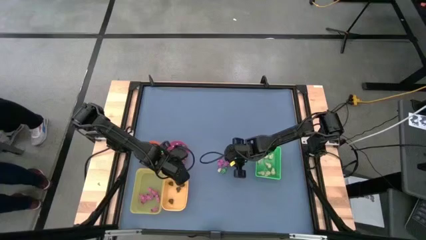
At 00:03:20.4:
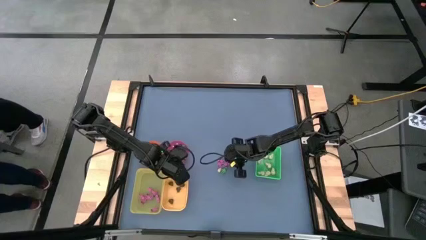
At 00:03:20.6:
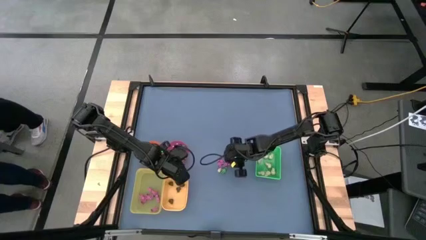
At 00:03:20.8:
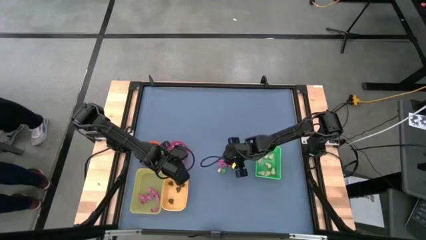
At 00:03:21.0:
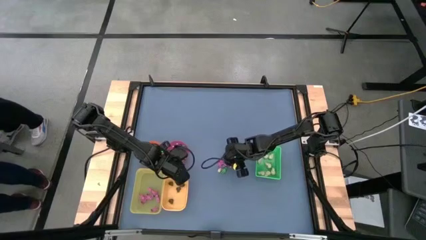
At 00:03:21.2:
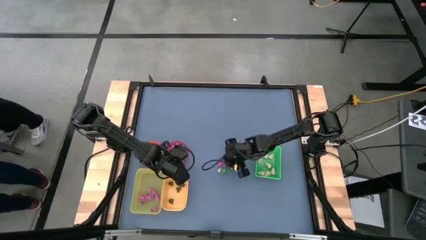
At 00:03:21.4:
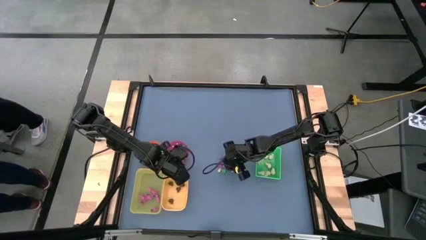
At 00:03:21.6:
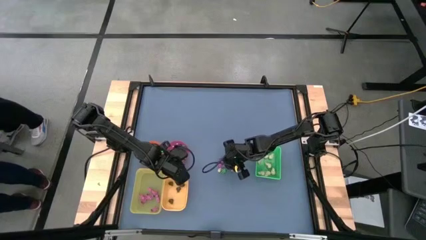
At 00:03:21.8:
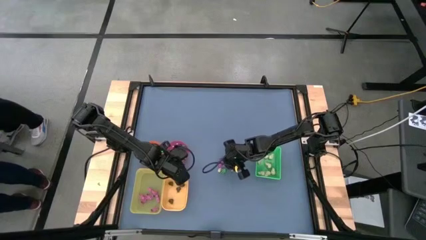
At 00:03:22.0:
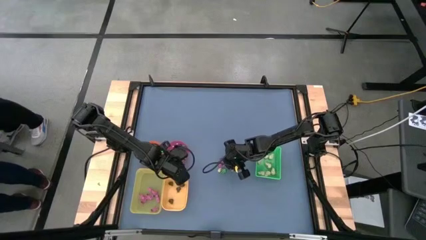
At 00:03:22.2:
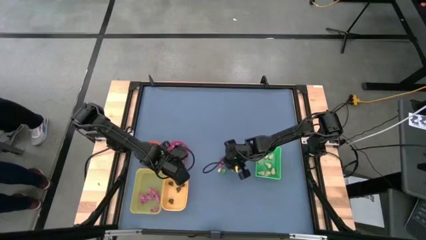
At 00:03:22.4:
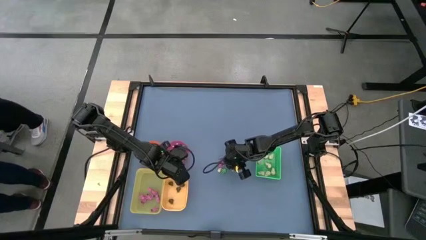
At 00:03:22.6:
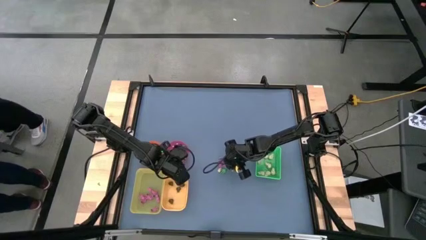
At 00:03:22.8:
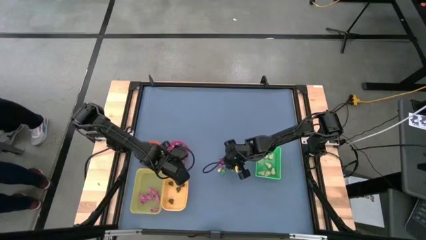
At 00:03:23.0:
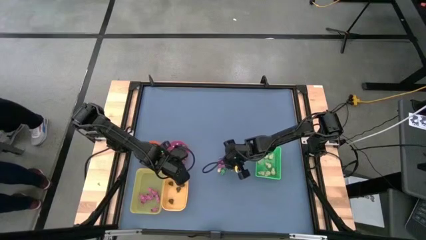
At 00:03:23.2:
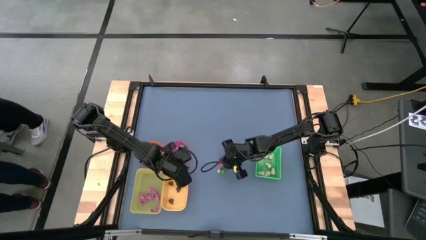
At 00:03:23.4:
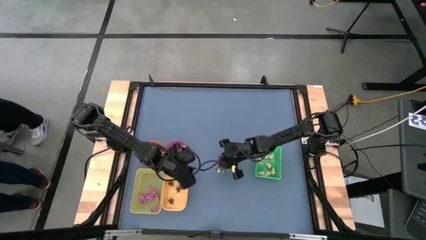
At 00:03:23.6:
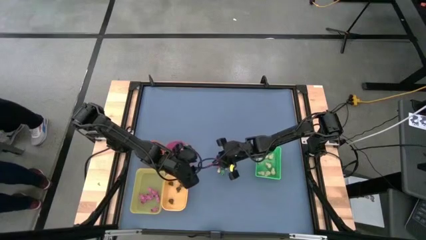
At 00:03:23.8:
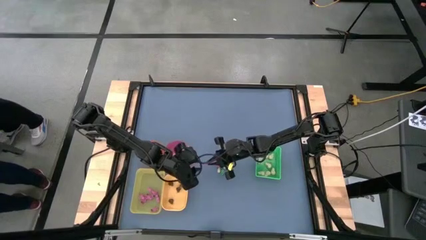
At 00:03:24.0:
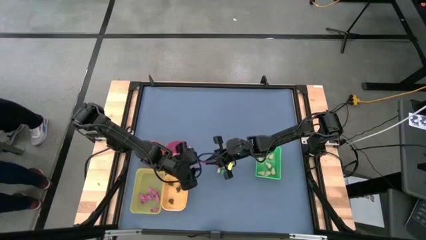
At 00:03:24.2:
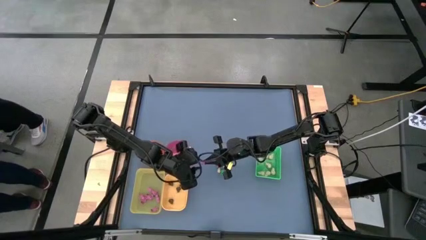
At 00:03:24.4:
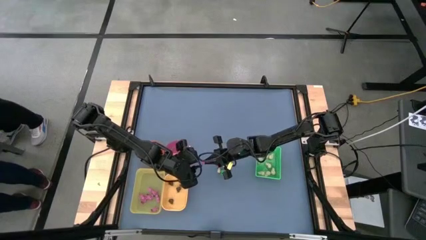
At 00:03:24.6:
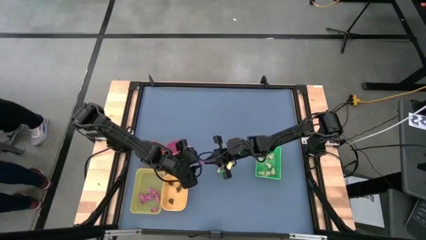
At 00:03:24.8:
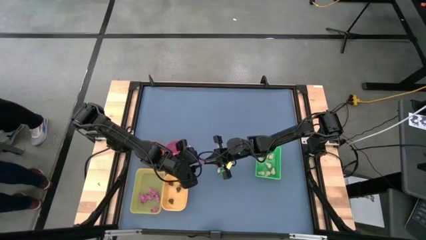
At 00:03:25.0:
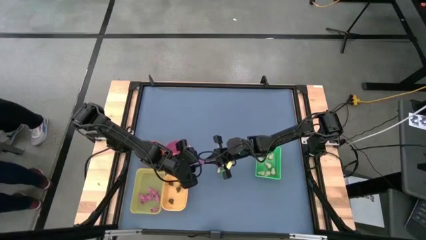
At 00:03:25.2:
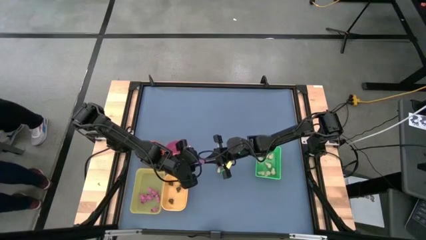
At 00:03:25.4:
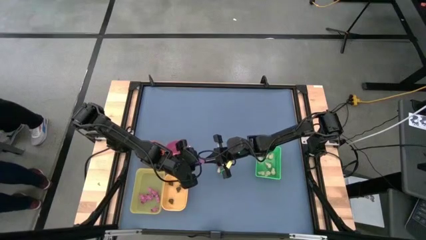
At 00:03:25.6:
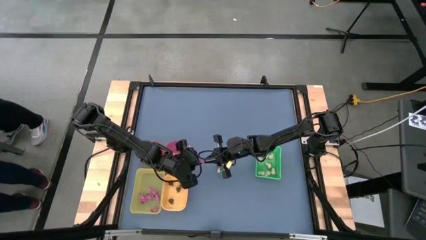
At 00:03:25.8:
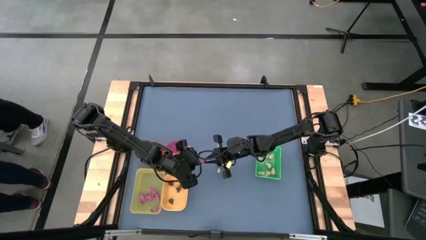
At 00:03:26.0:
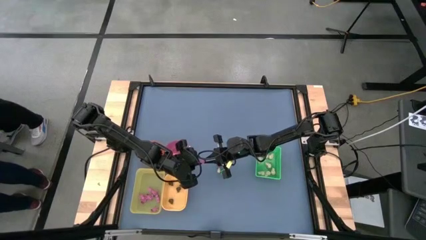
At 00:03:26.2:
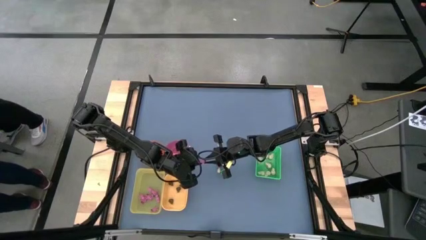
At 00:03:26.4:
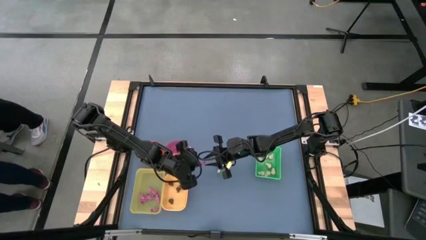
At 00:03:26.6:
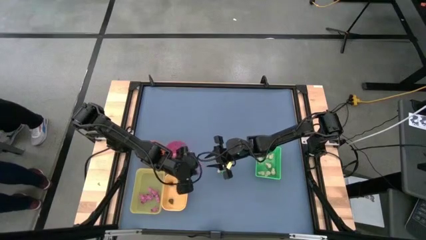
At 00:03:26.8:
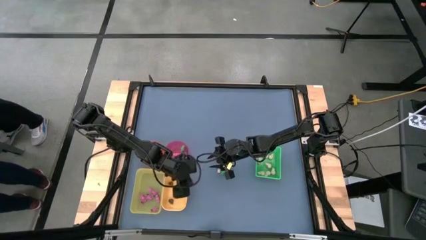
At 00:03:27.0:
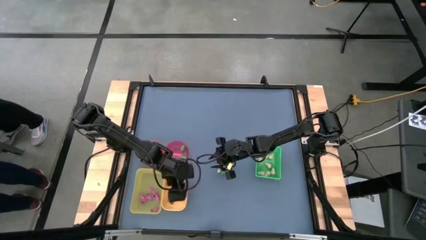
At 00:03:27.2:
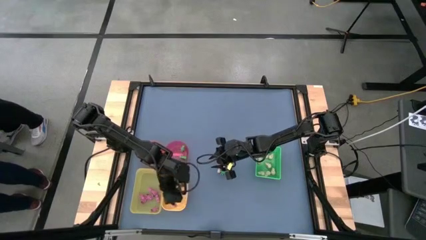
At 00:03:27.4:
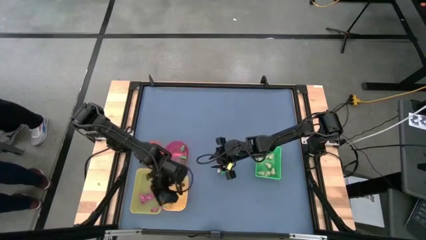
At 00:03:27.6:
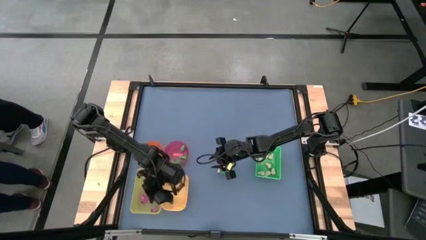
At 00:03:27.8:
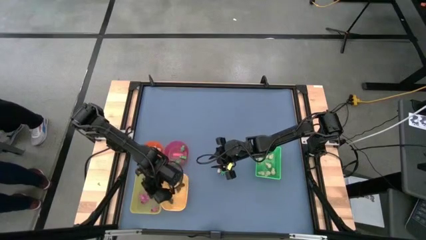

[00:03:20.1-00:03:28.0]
Task: Sort Halloween decoration
Put the pink skeleton toy into the light yellow bin

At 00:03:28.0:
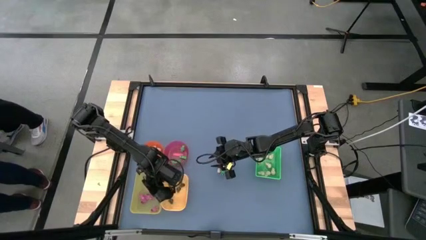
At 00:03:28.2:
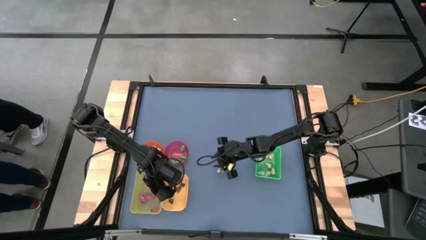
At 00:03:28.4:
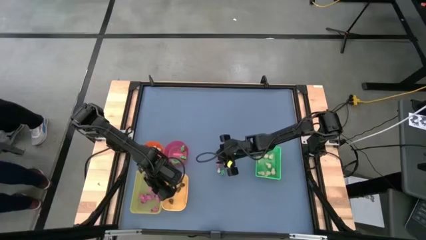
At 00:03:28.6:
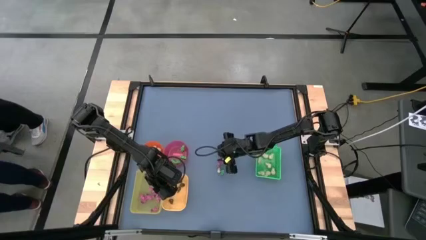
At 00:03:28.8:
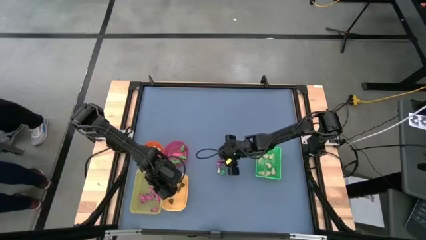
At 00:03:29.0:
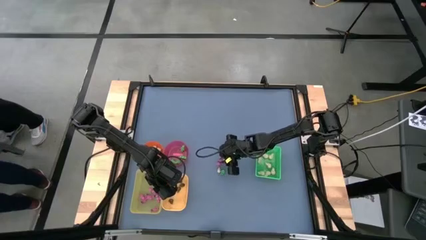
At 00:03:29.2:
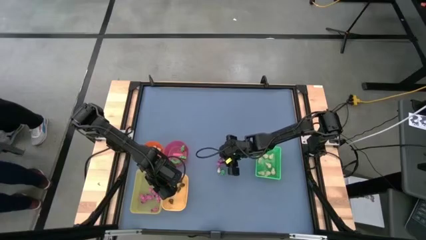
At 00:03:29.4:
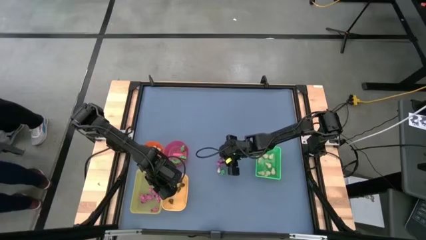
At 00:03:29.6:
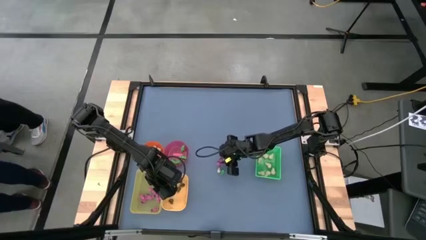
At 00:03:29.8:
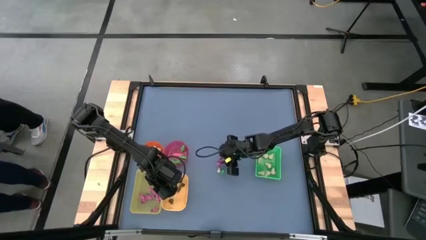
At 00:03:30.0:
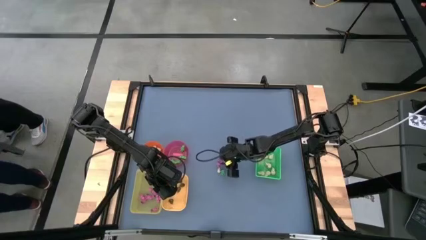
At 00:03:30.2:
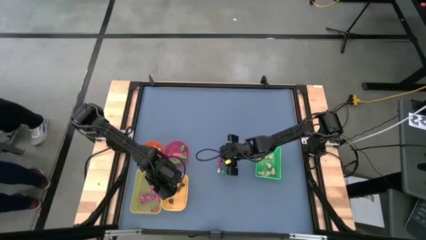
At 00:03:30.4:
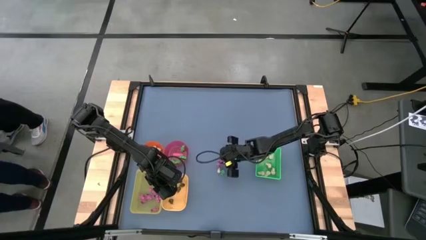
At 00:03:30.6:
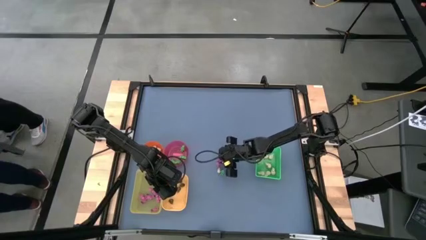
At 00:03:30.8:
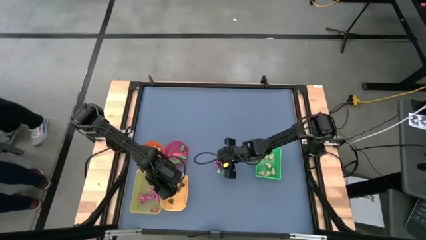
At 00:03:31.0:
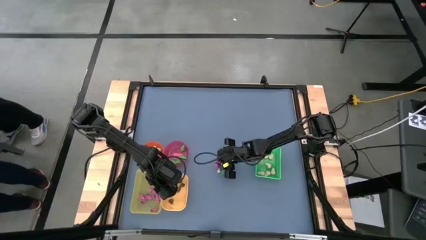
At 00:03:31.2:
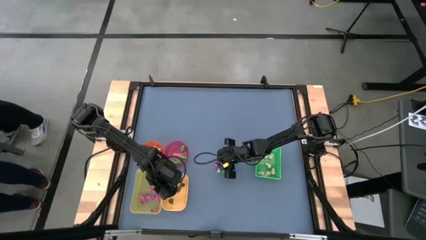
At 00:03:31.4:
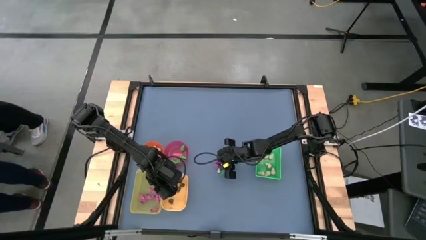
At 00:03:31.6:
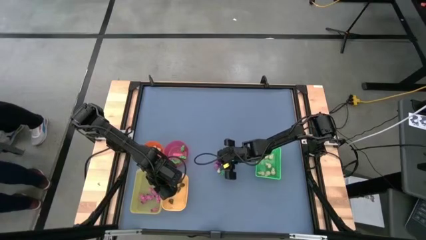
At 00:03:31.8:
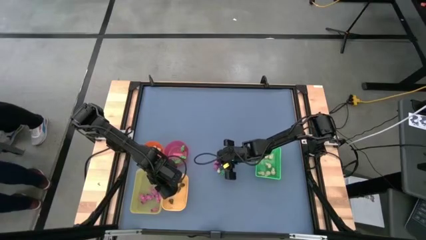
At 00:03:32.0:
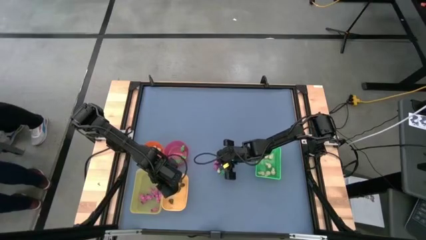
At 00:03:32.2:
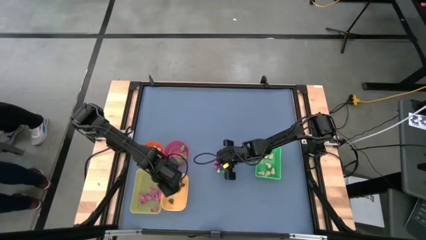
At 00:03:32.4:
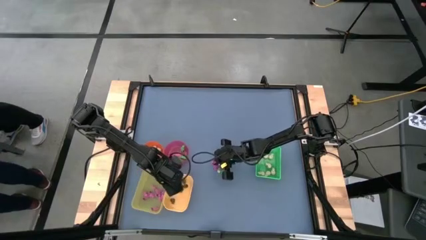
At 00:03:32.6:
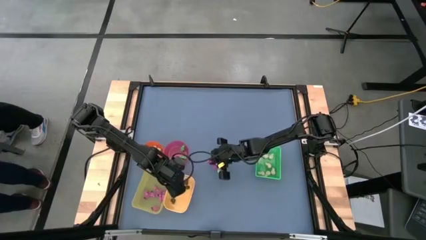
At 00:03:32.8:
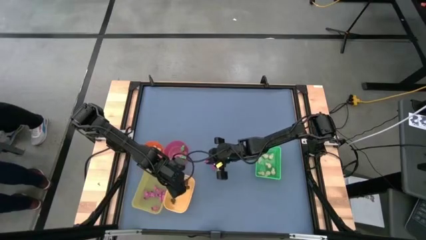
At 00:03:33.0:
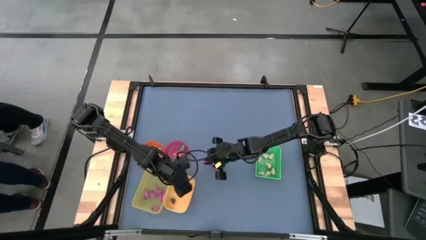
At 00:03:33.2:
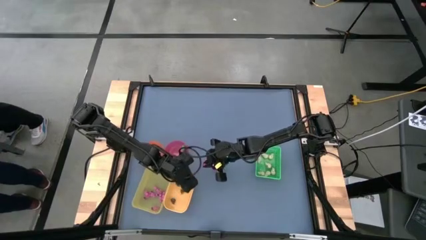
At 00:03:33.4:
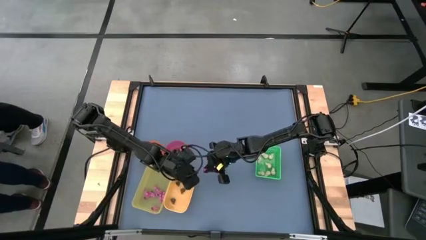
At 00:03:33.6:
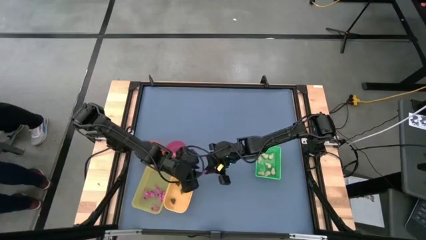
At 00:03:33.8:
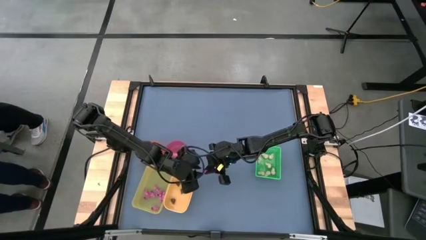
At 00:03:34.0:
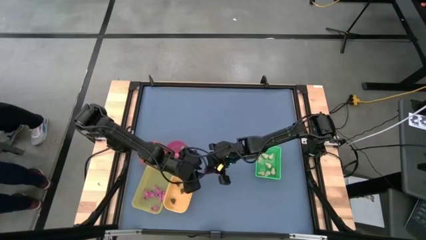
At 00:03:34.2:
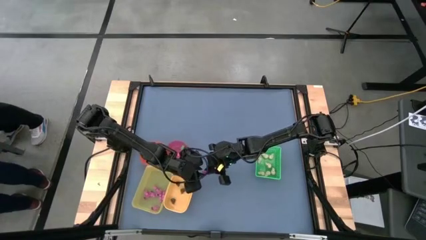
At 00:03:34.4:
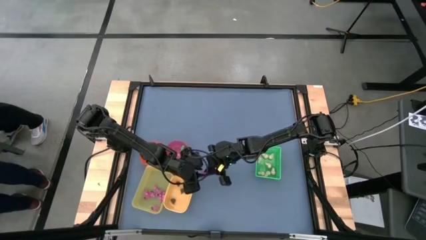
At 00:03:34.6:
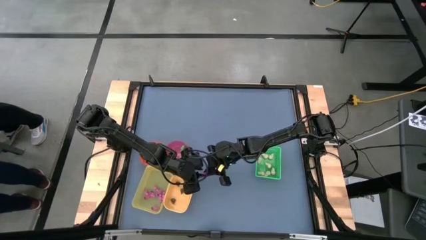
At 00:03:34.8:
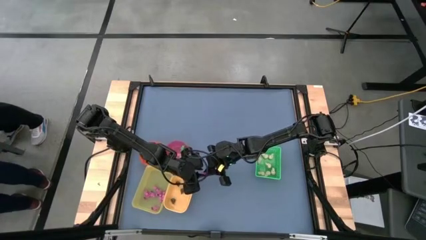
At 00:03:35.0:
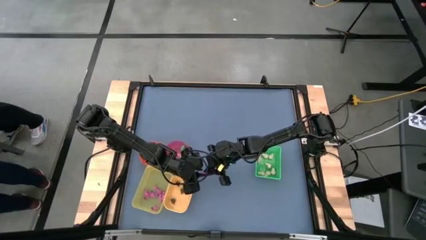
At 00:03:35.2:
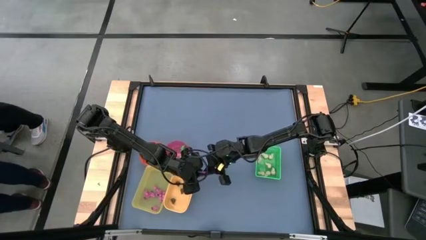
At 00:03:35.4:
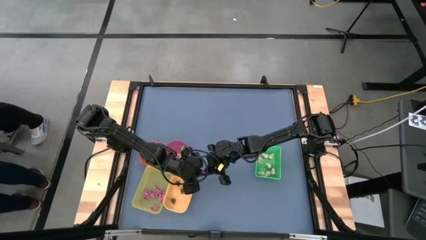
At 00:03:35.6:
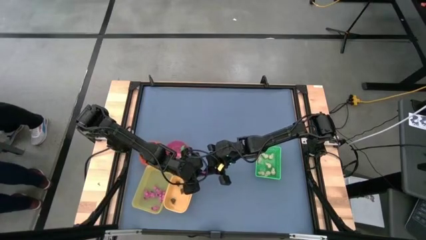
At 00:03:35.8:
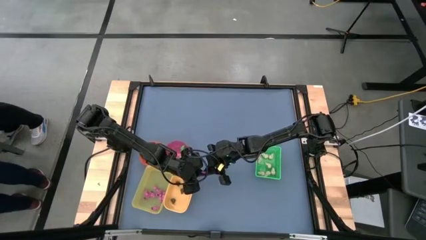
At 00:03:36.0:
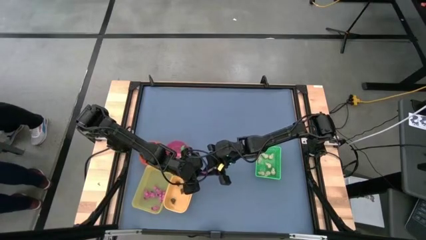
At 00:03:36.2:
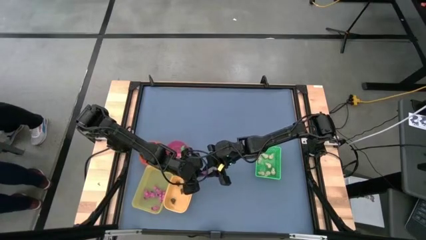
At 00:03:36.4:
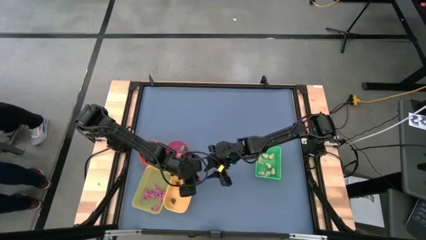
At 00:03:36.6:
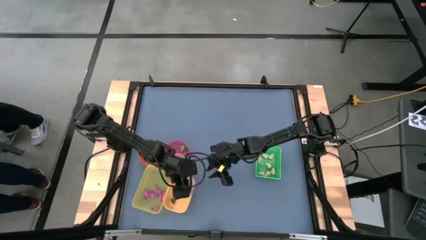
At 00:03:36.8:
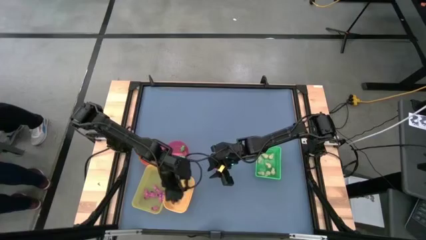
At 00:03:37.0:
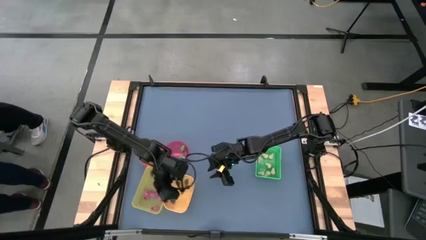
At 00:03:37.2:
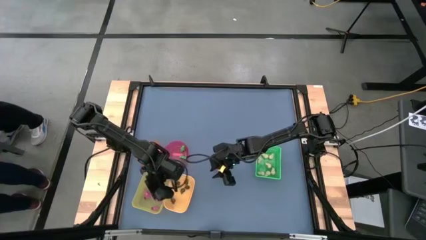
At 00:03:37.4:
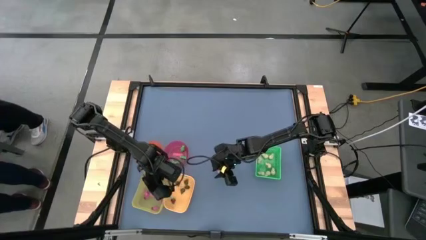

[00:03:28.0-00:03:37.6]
Put the pink skeleton toy into the light yellow bin
